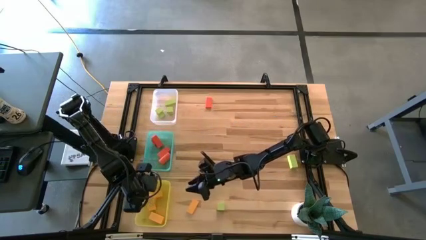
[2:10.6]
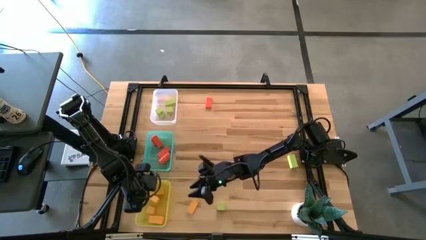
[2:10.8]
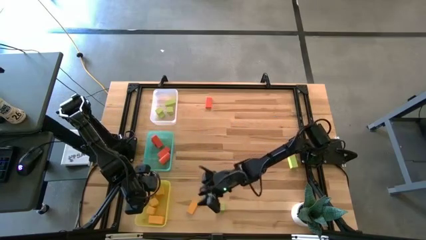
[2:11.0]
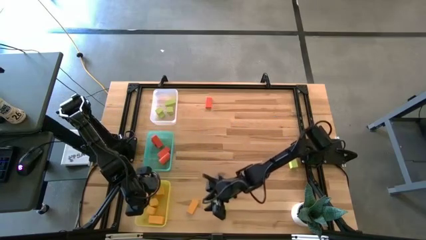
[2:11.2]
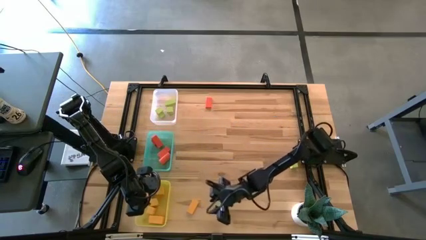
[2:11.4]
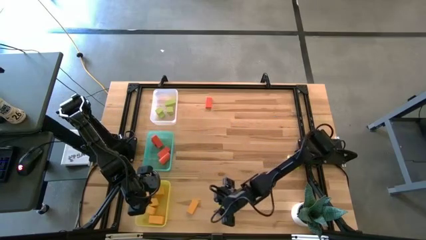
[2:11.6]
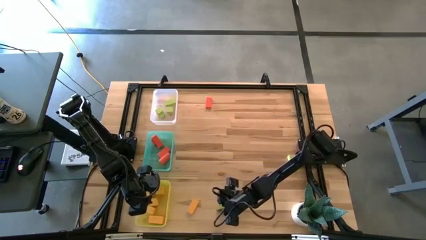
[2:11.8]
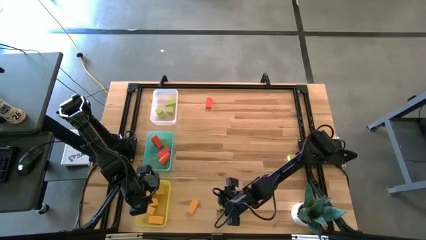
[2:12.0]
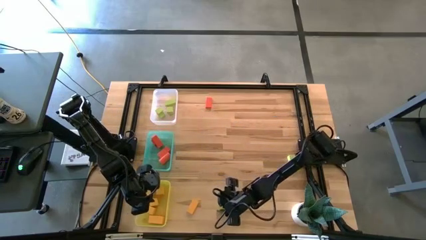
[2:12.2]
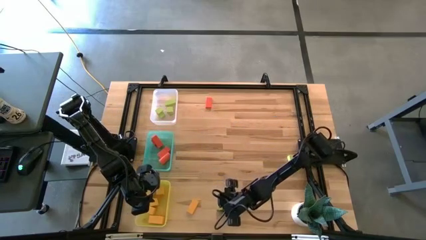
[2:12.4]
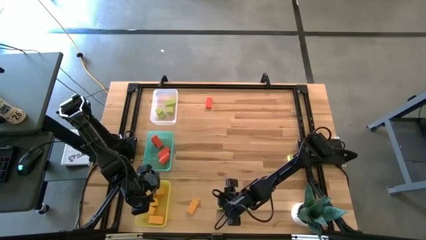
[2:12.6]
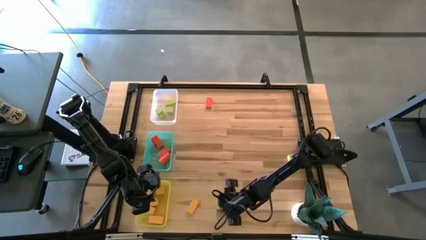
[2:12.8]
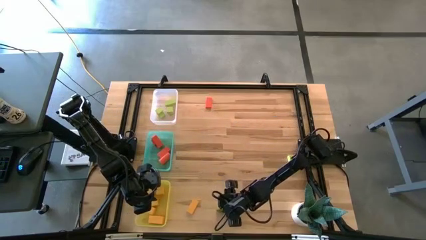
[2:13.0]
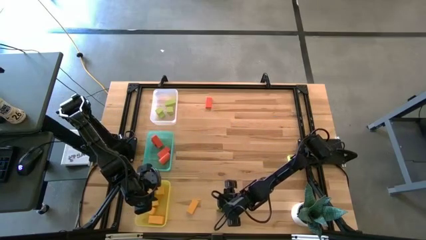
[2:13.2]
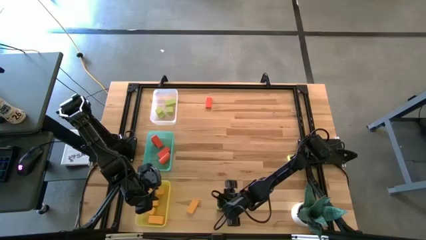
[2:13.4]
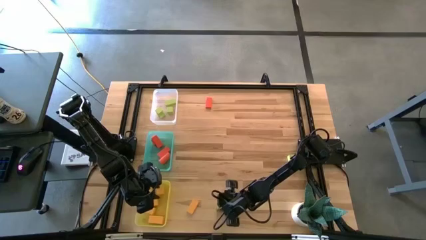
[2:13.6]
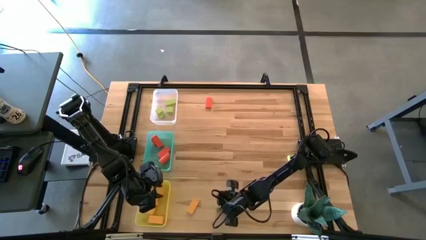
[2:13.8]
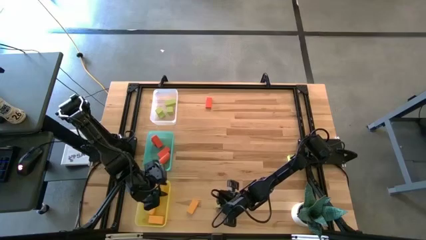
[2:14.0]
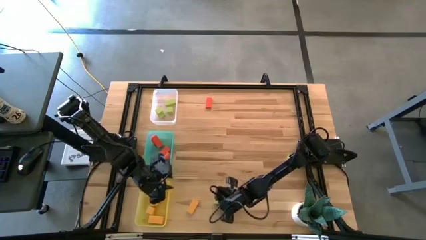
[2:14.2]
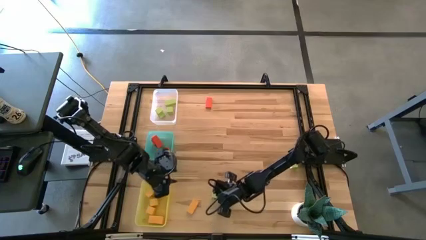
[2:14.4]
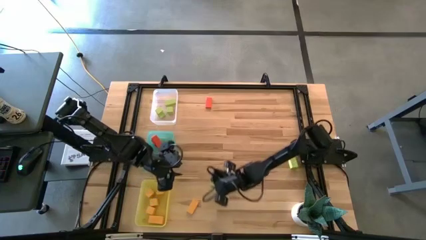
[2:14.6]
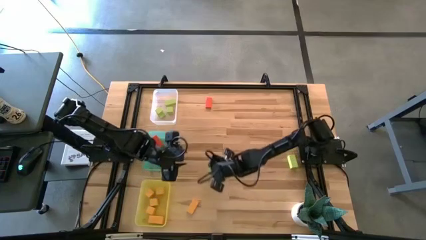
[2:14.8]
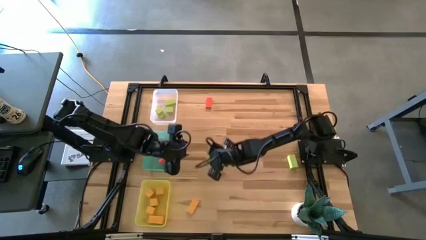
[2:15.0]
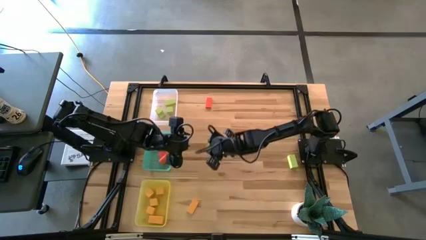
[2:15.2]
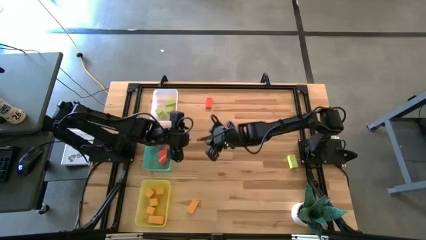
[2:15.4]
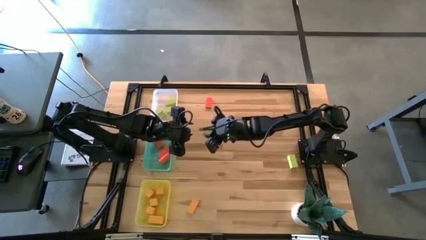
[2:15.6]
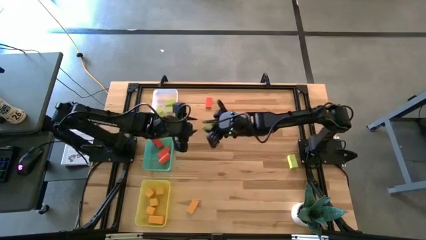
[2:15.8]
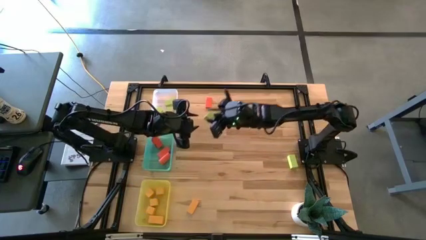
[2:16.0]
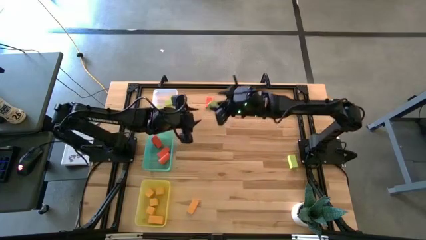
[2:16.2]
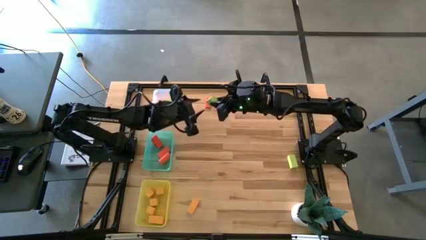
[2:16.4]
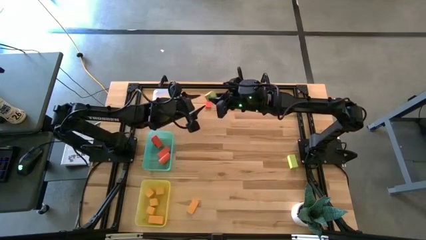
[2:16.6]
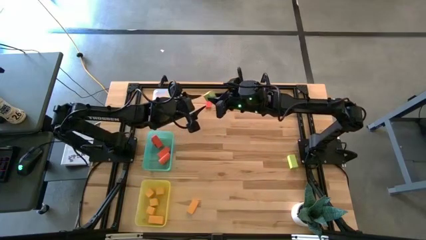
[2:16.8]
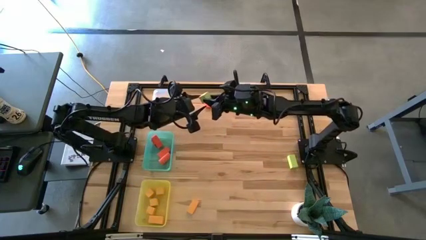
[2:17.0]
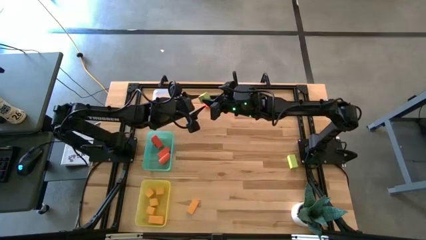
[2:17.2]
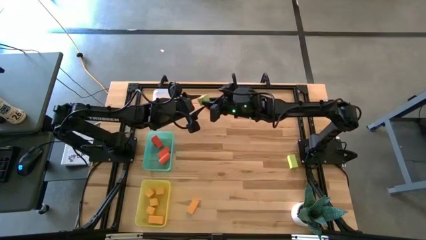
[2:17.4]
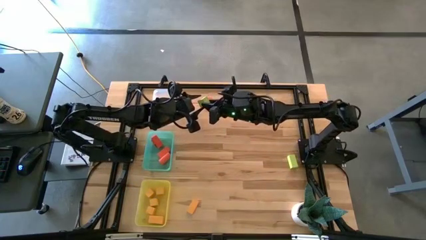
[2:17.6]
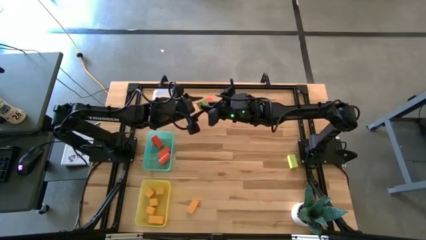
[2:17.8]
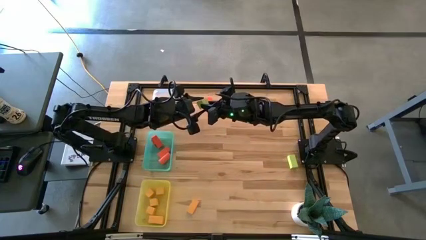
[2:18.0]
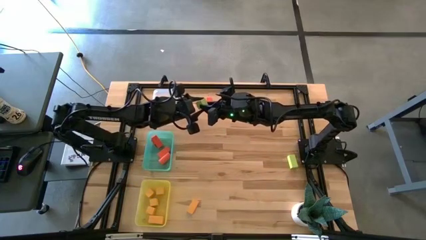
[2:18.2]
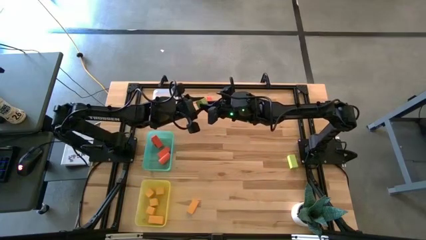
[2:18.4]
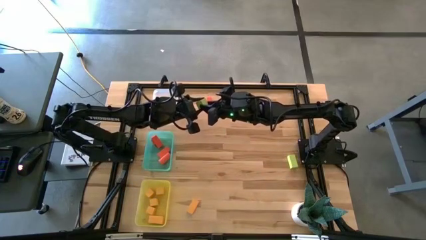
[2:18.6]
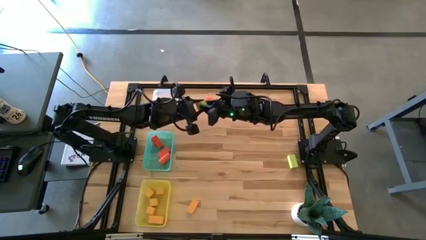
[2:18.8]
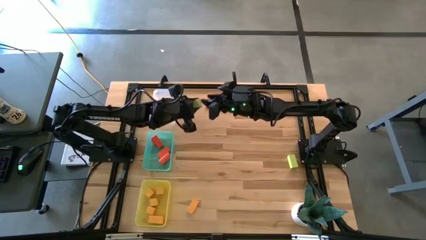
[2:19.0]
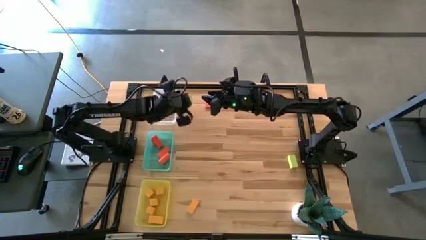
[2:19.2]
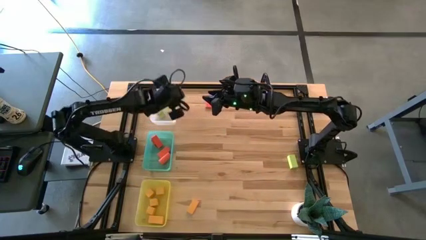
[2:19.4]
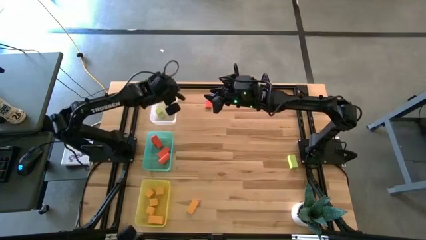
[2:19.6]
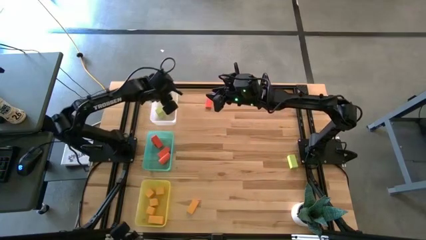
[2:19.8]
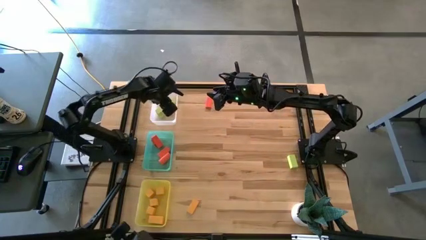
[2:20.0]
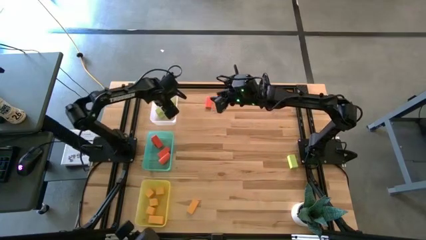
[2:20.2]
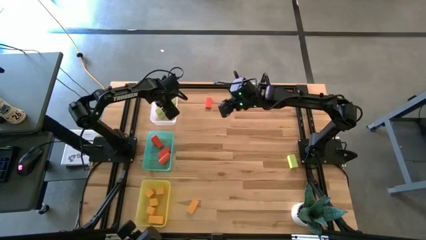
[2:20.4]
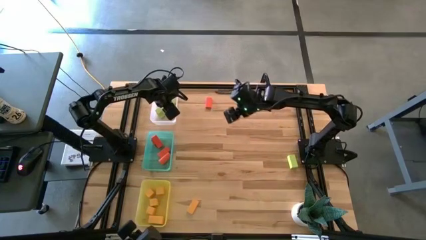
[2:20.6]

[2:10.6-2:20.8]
Task: Sort & place blocks by color
Put the green cube block into the transparent bin

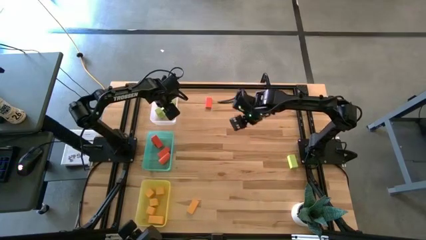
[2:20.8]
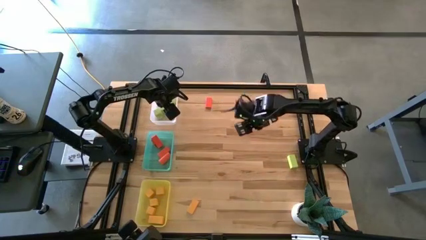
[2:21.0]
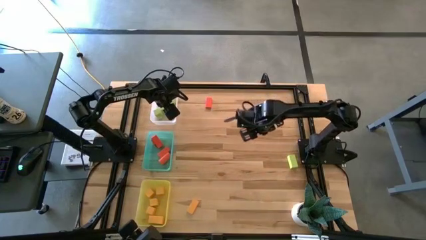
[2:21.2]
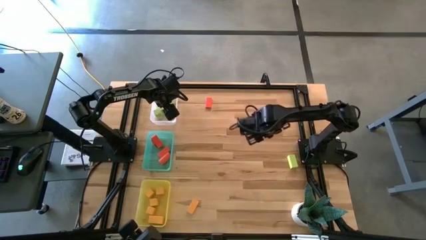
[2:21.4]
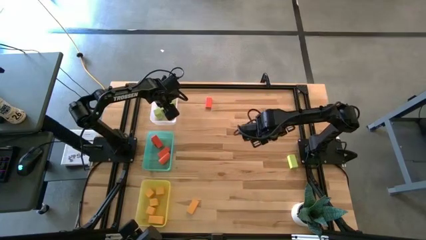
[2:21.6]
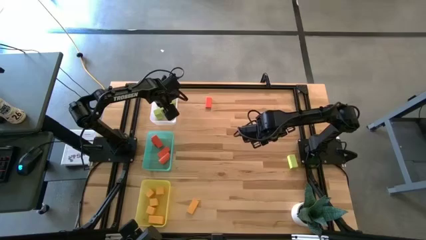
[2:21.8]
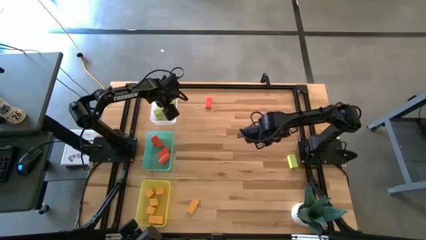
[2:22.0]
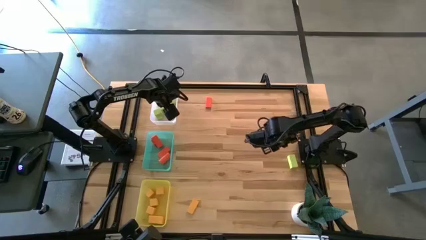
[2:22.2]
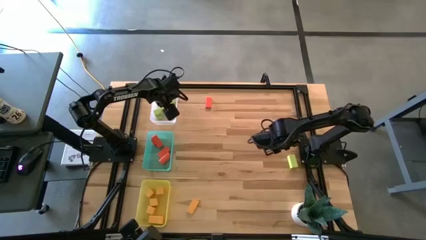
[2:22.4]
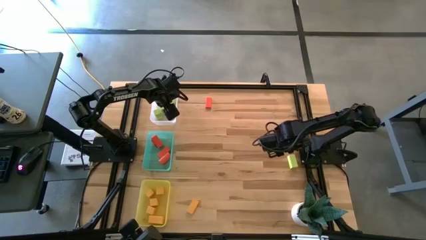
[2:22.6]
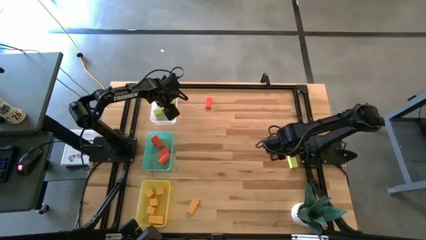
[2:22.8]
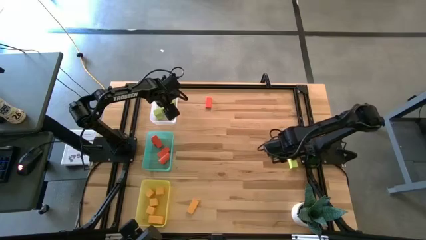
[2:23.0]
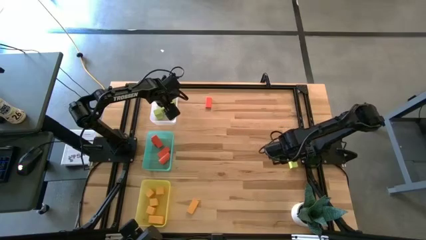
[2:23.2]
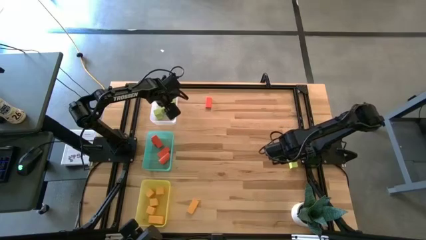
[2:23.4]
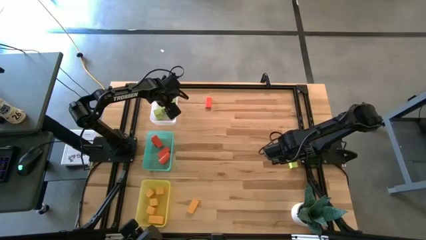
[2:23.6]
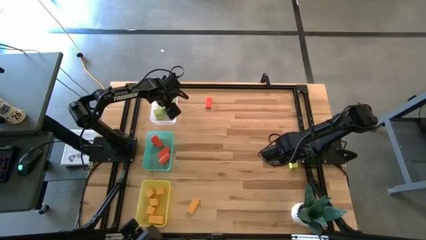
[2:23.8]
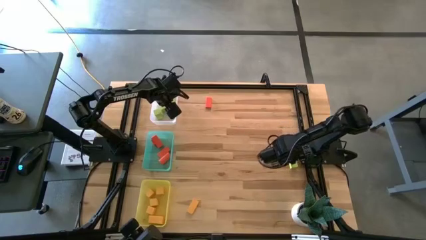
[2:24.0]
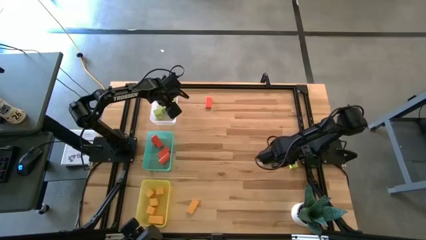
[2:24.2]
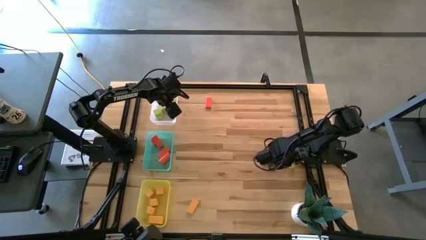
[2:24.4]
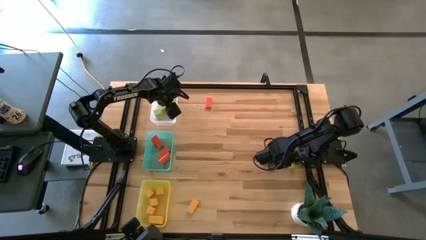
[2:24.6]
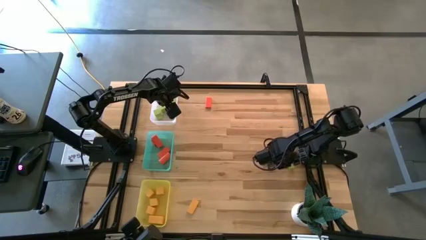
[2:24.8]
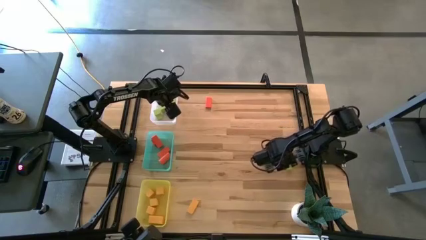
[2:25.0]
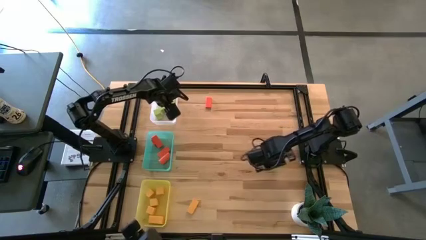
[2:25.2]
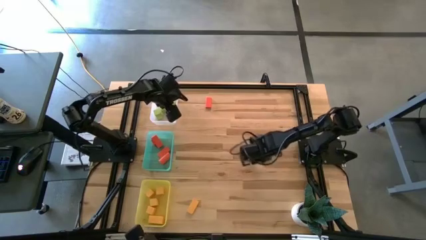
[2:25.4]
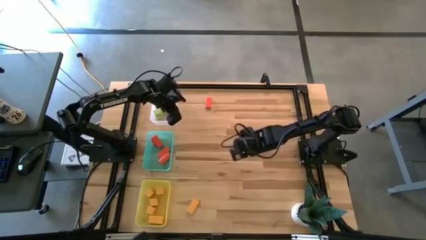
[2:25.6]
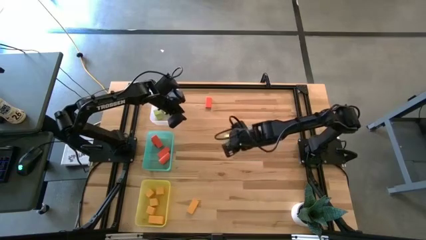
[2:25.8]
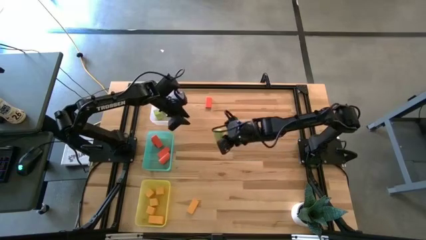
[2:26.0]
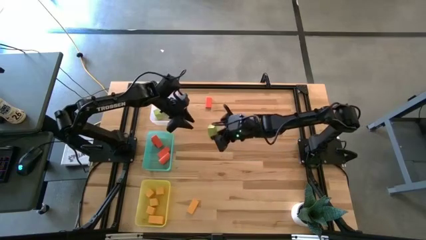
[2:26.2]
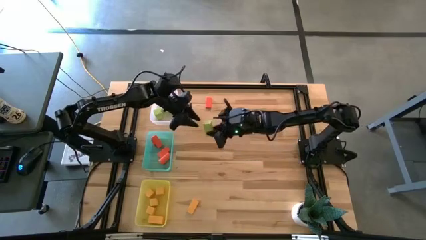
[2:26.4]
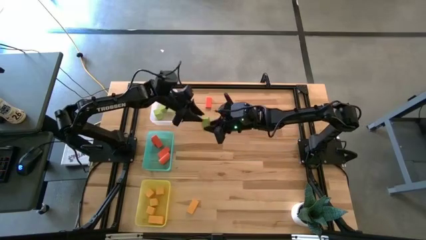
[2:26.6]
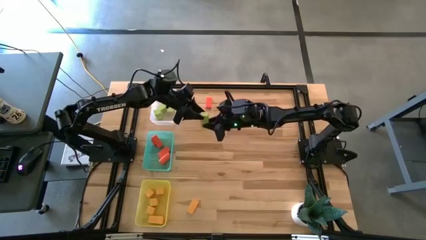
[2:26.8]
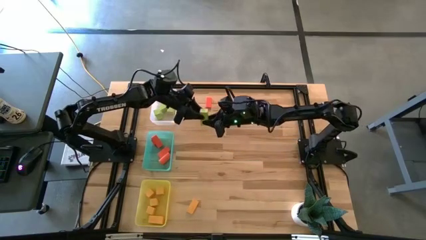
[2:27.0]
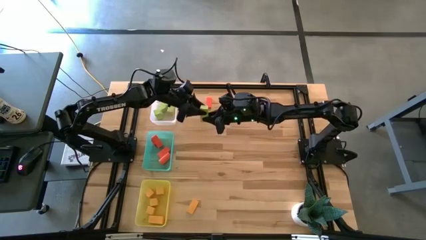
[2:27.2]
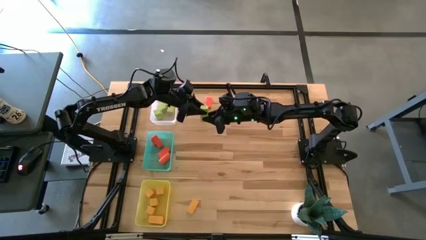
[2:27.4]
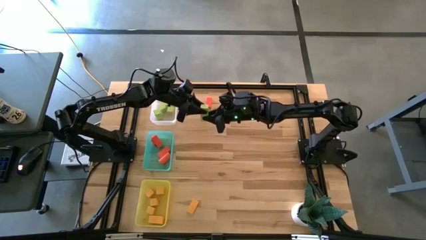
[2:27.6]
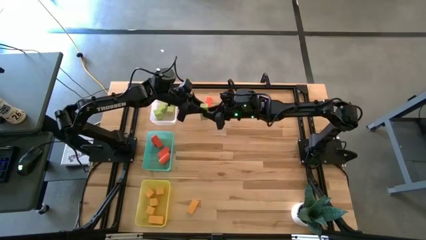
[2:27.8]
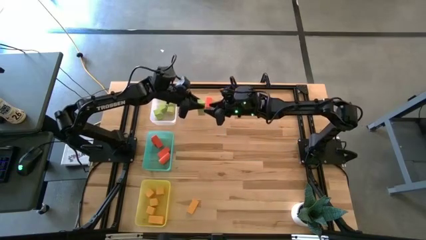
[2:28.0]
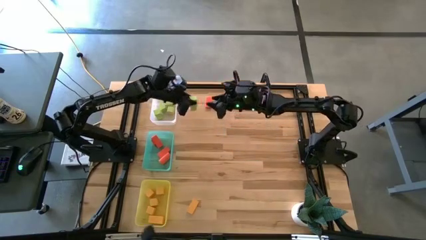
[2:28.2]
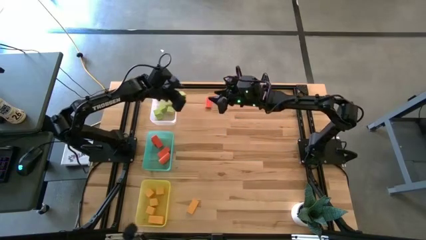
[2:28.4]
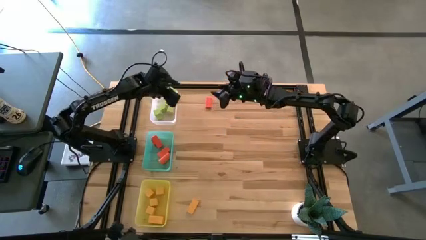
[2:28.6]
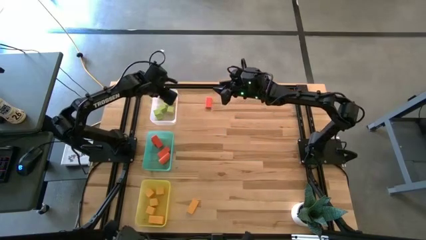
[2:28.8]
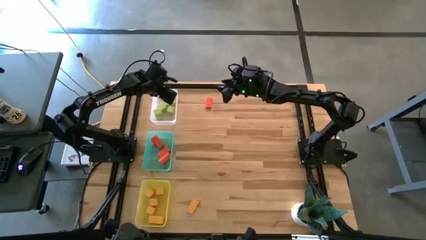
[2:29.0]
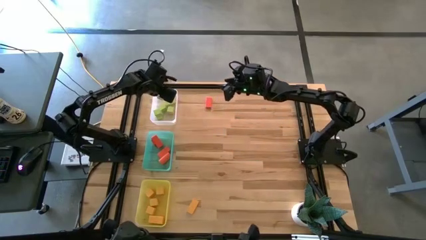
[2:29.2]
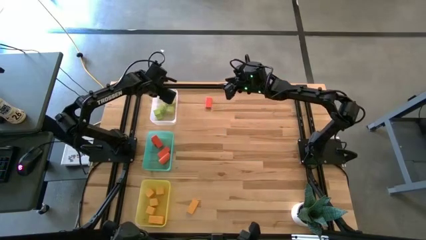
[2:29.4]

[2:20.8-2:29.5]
Put the green rectangular block into the transparent bin
